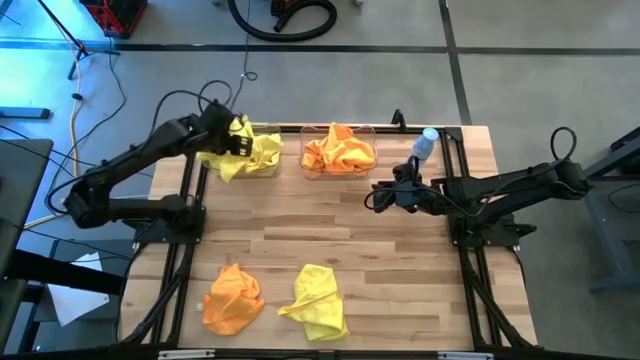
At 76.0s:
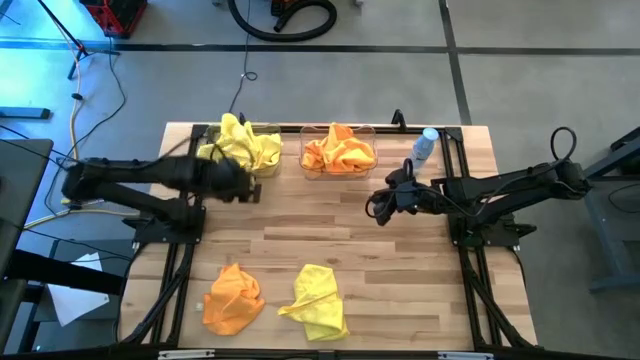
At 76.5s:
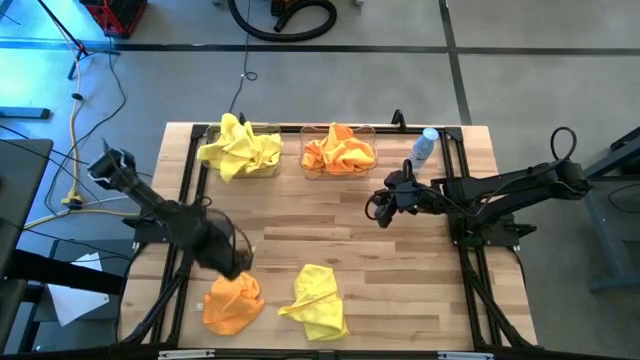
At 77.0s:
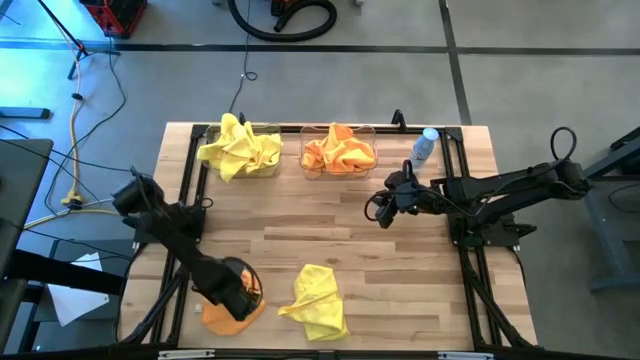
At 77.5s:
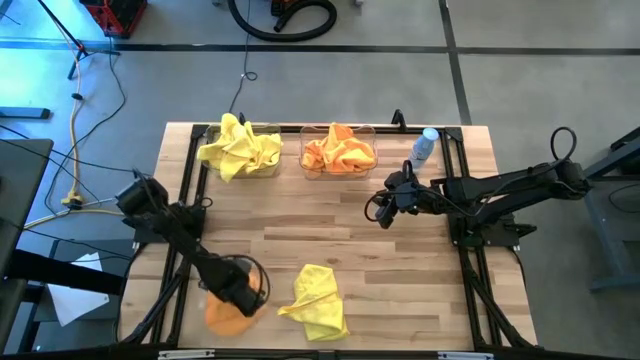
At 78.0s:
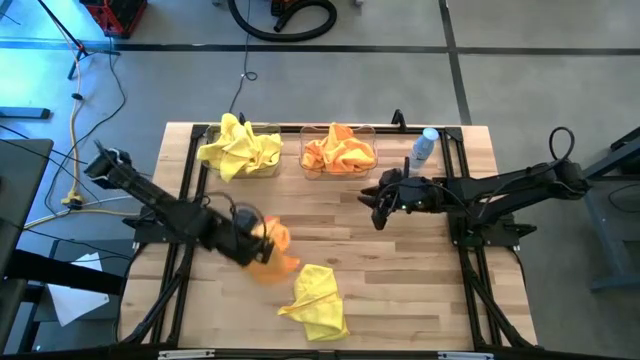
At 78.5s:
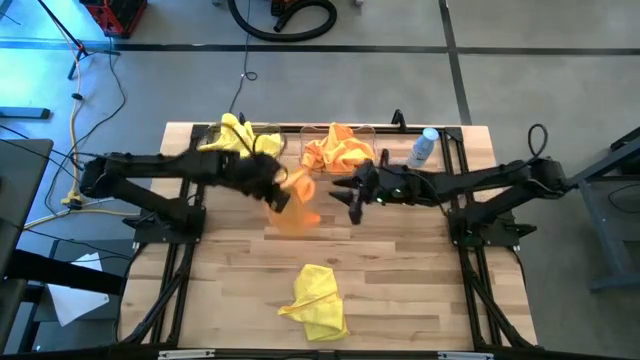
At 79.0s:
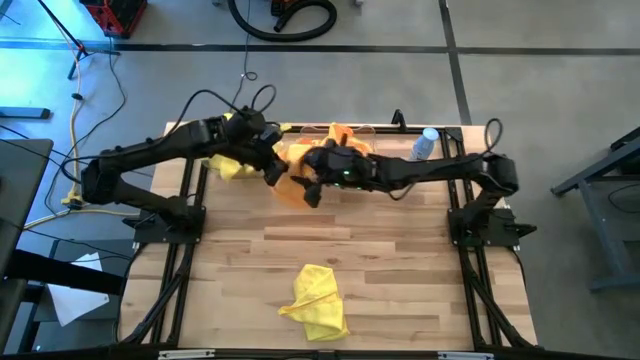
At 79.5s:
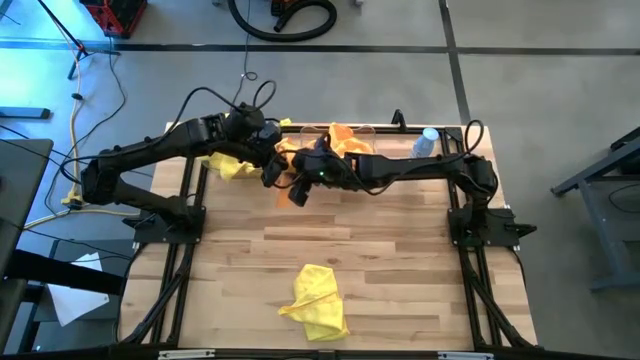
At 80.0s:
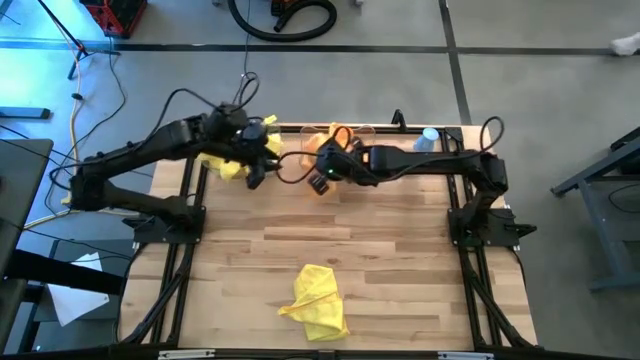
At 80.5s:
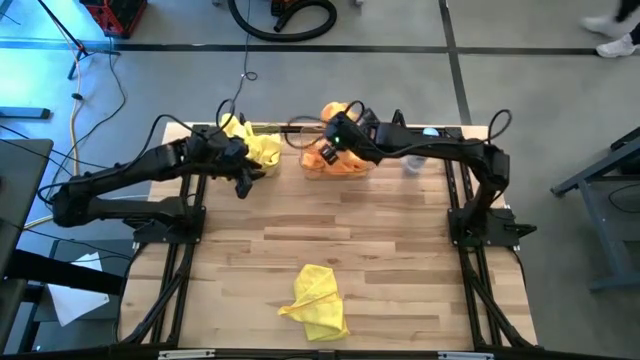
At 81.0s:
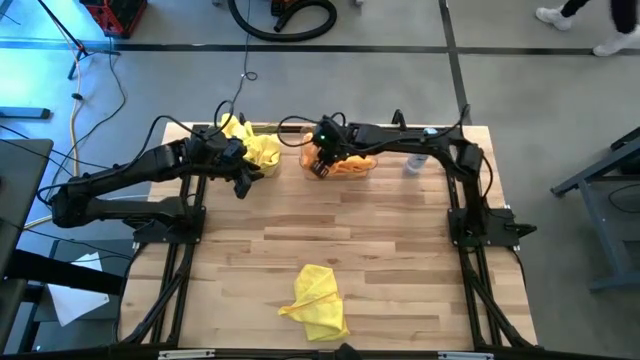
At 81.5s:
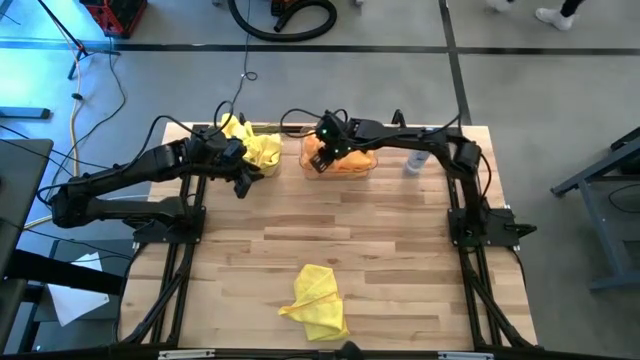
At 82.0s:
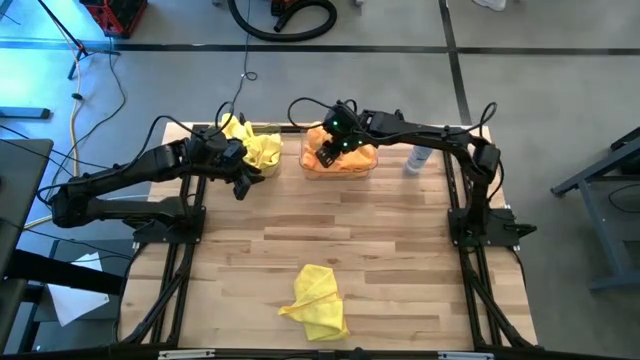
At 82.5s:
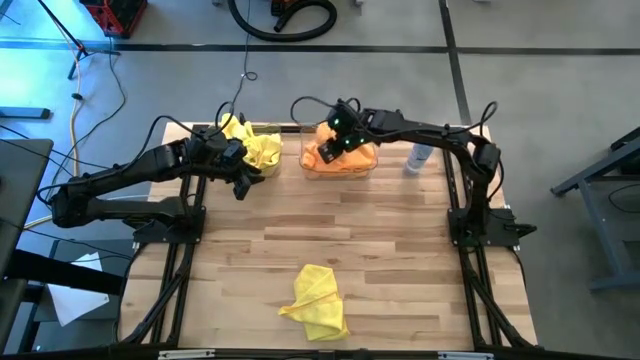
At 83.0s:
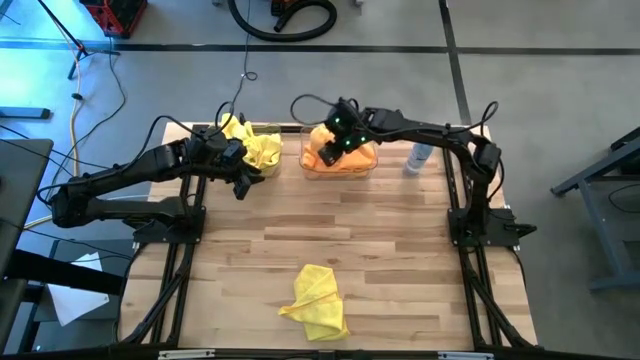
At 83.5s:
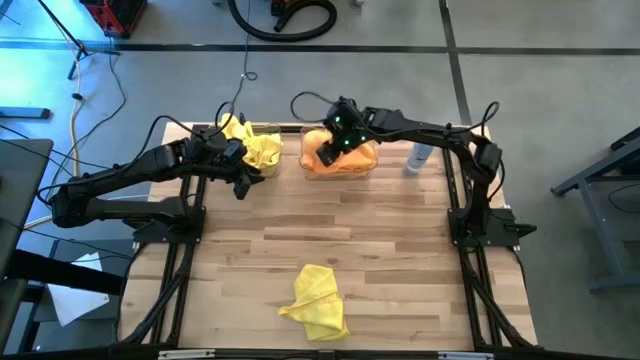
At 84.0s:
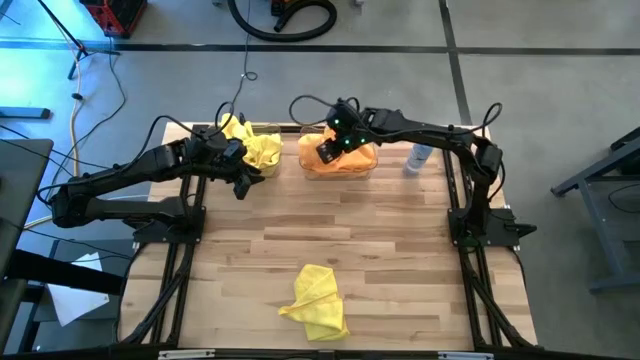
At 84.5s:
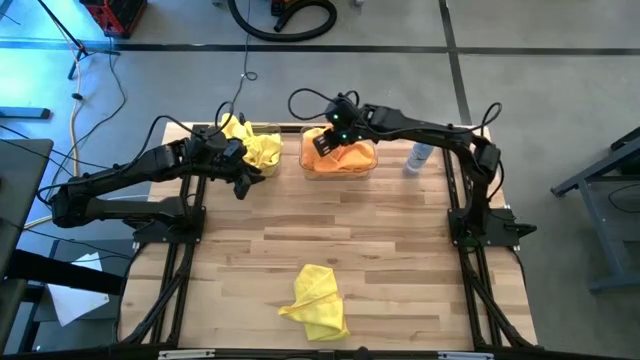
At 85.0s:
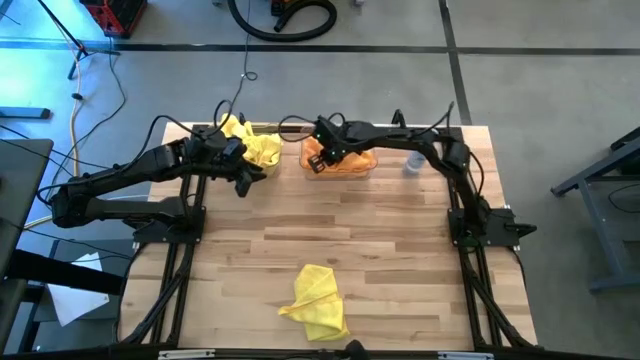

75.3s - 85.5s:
Task: Sort microfiber towel by color & place in baskets
Put the orange microfiber towel into the right transparent bin

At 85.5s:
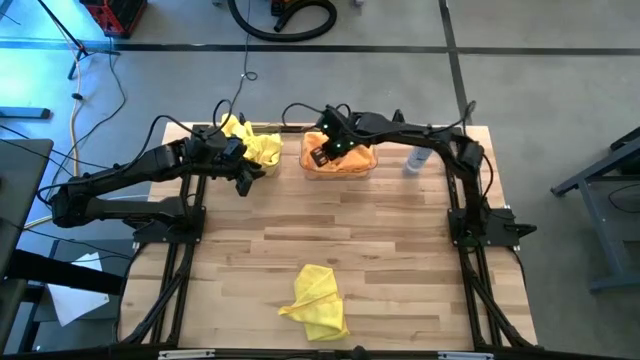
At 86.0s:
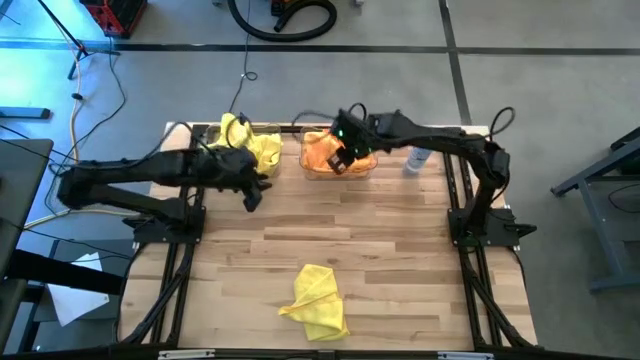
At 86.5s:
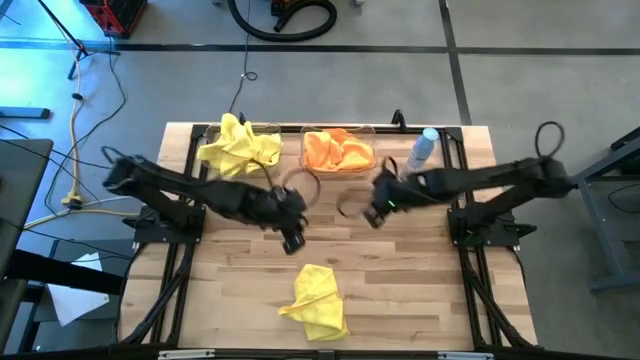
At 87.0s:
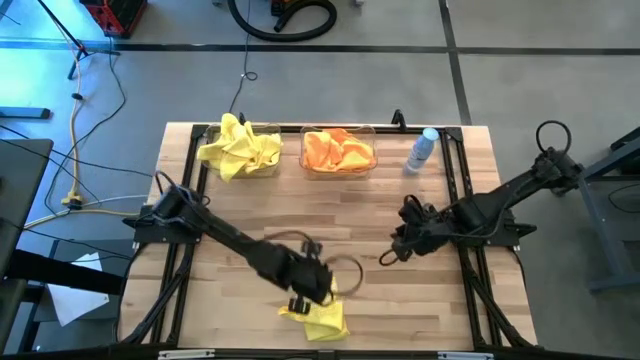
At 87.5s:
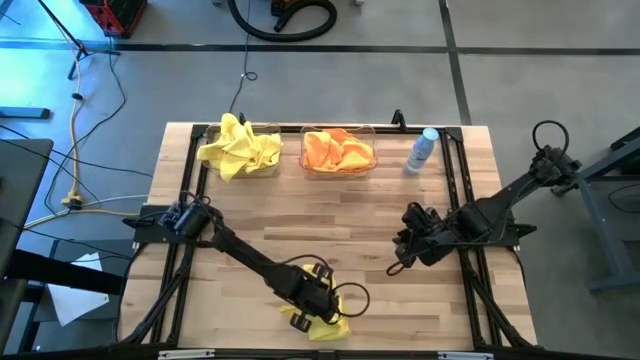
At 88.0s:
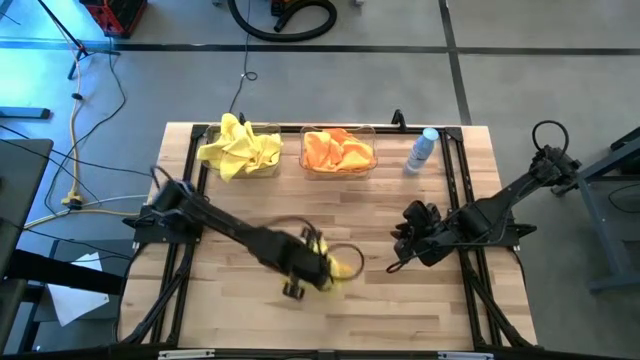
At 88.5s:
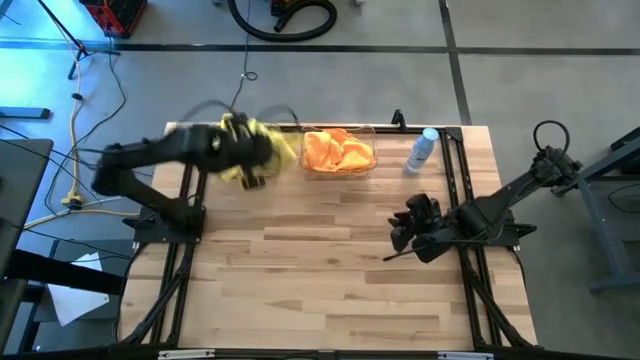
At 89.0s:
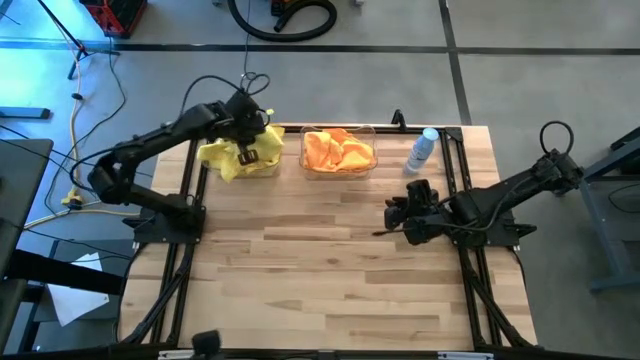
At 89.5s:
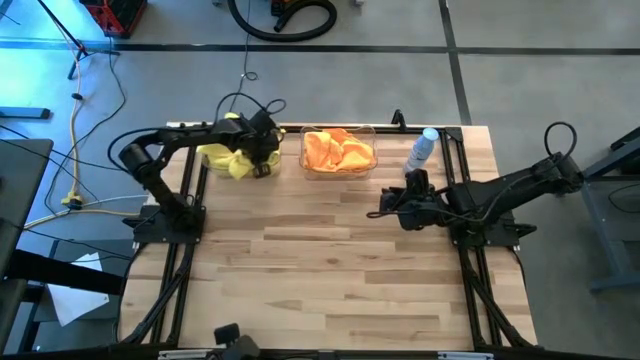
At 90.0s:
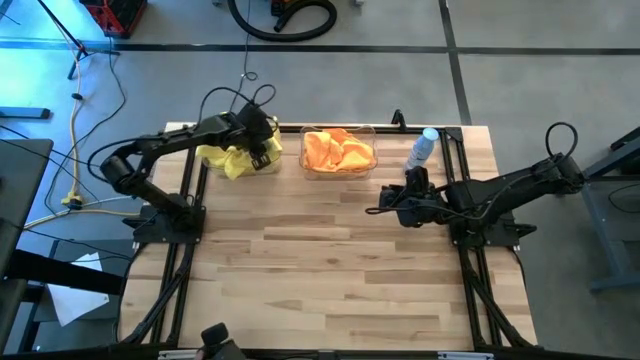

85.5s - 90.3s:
Put the yellow microfiber towel into the left transparent bin

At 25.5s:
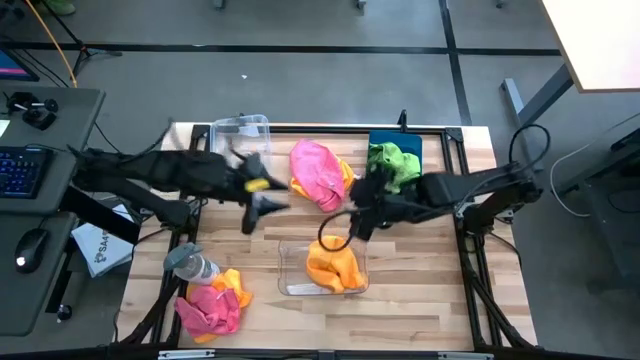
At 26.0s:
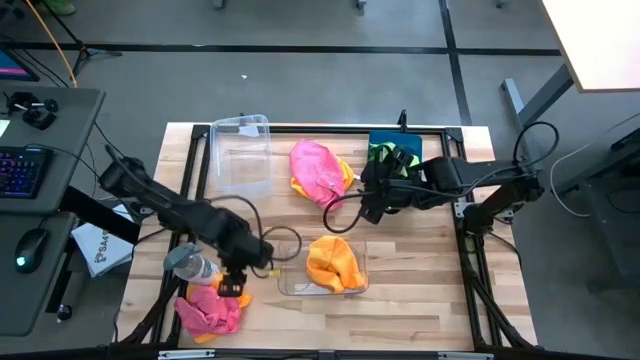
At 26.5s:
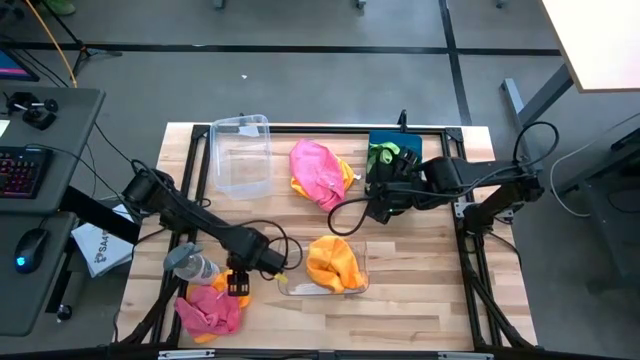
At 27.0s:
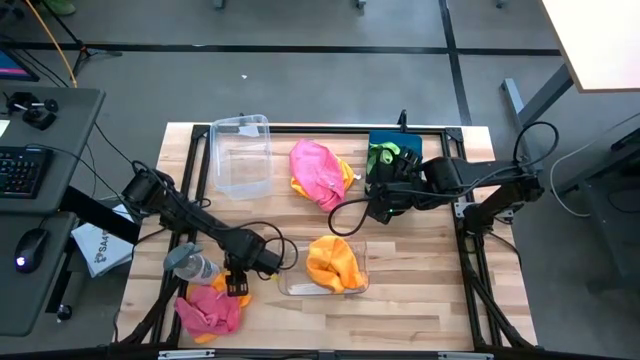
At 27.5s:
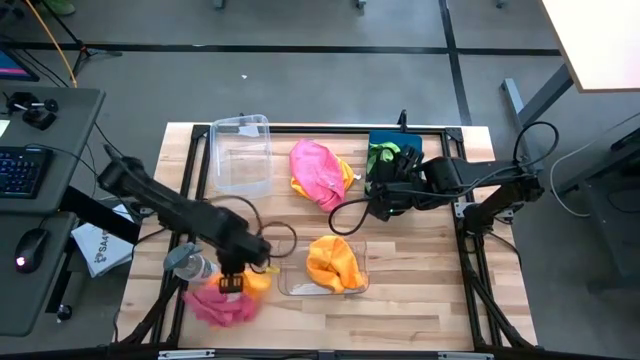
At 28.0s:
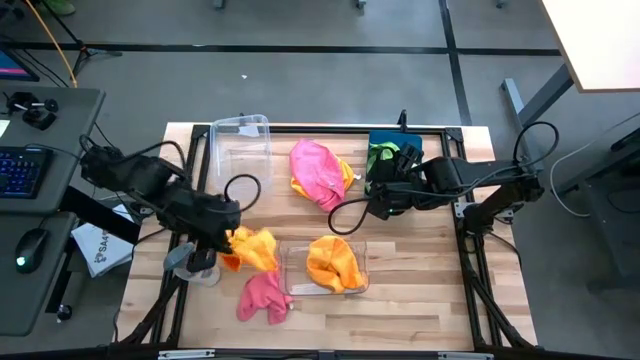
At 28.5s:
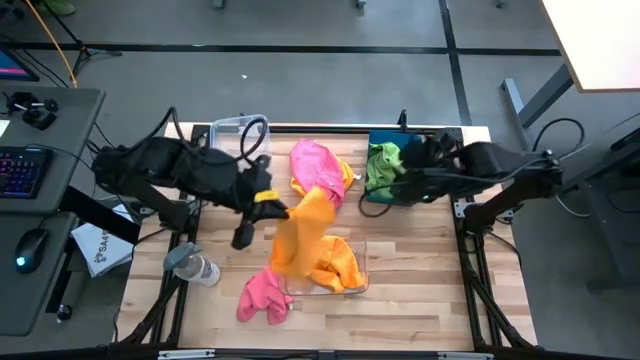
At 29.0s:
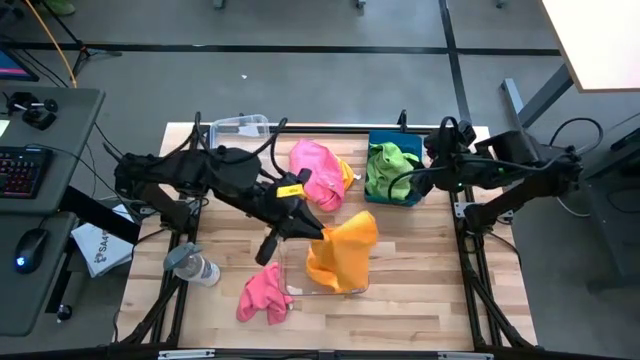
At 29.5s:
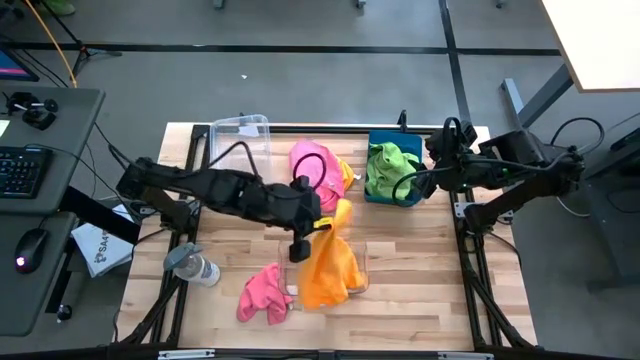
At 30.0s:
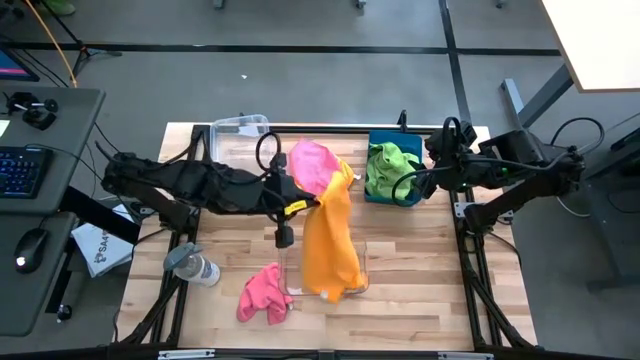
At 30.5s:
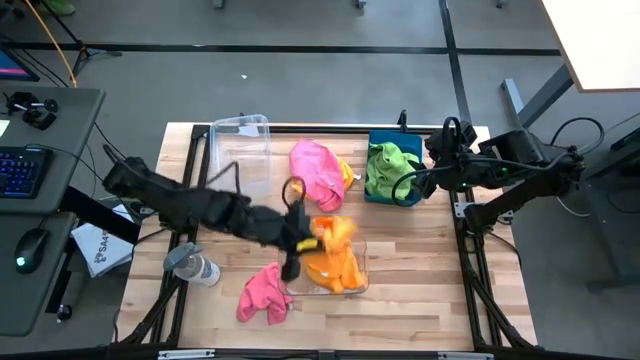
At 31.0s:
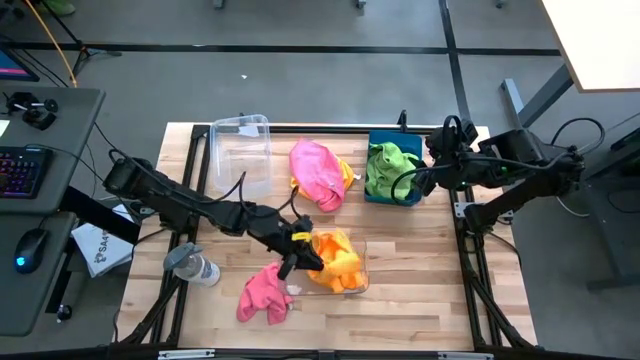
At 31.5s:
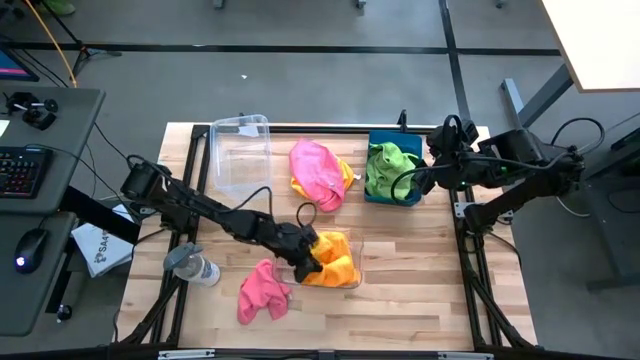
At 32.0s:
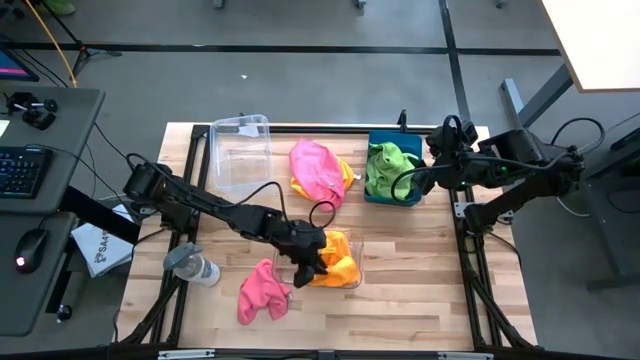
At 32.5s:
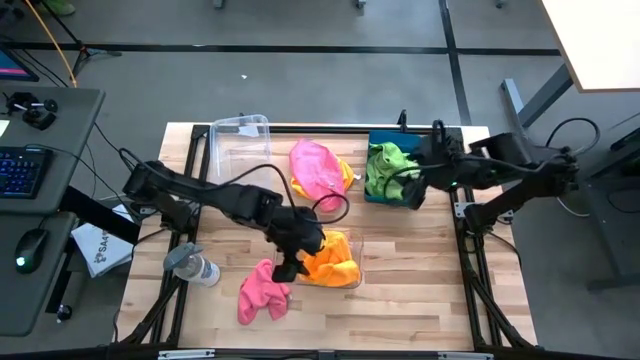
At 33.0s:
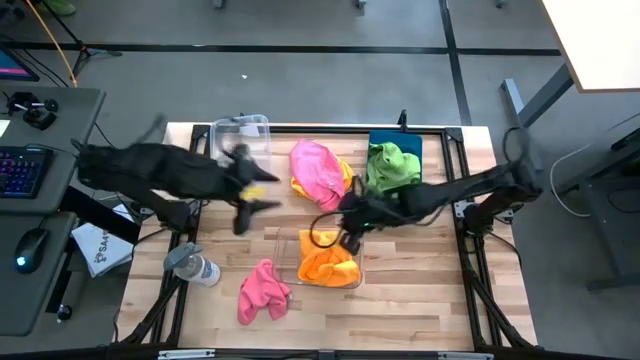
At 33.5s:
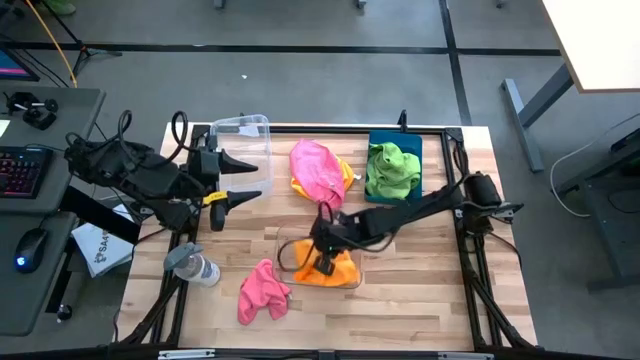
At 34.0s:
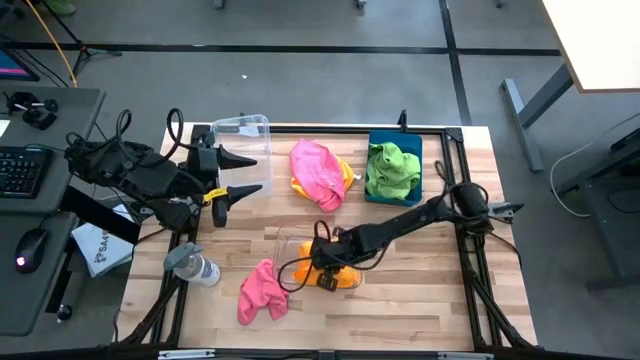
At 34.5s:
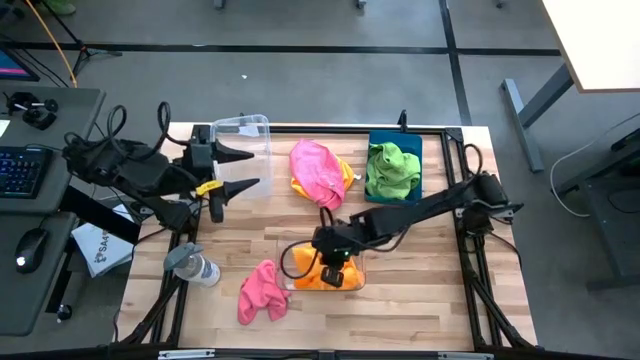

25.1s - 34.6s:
Task: Sort microfiber towel by color & place in baskets
Put the bottom yellow microfiber towel into the bottom transparent bin
